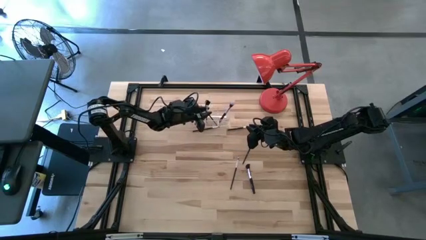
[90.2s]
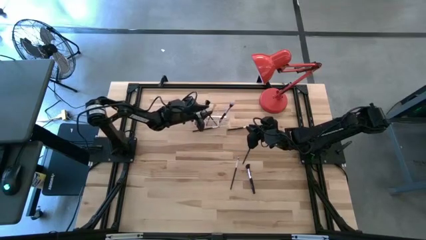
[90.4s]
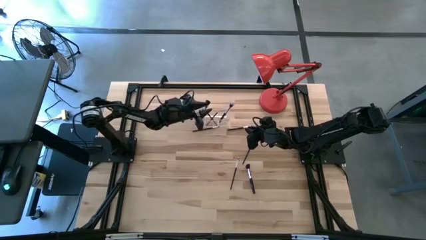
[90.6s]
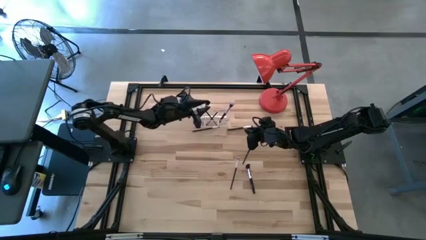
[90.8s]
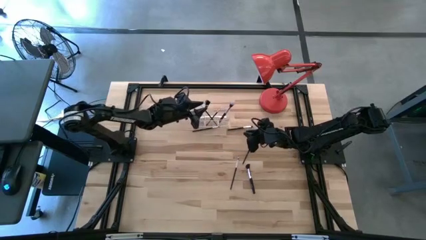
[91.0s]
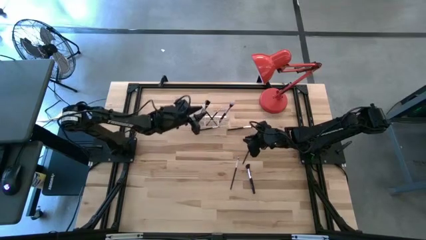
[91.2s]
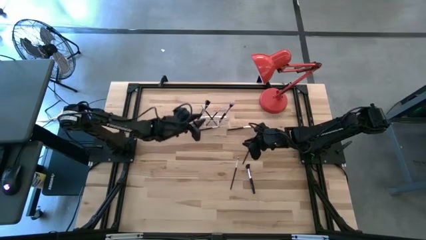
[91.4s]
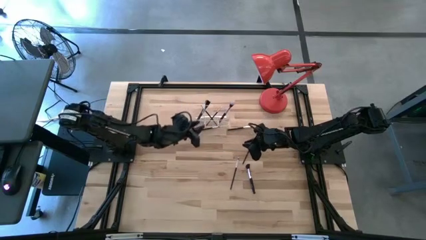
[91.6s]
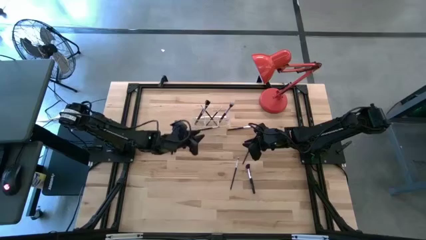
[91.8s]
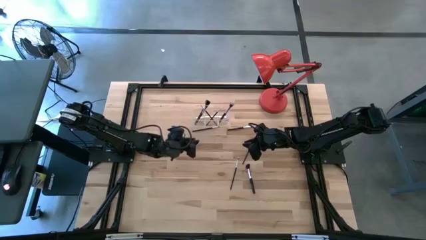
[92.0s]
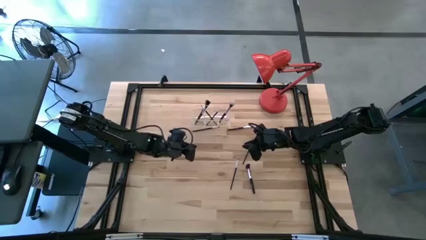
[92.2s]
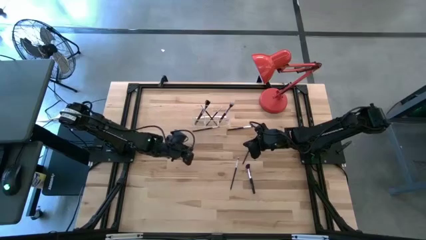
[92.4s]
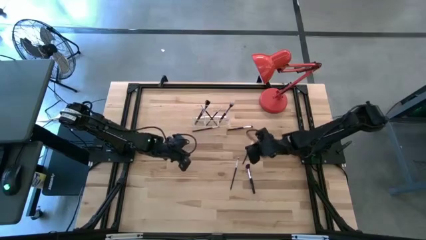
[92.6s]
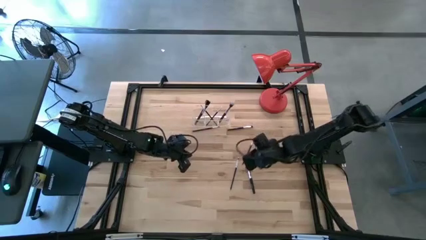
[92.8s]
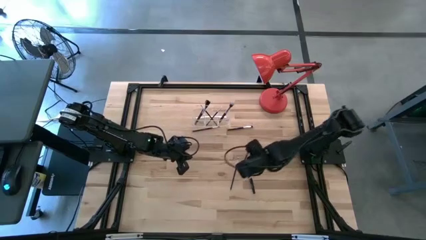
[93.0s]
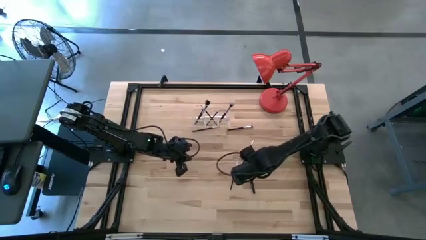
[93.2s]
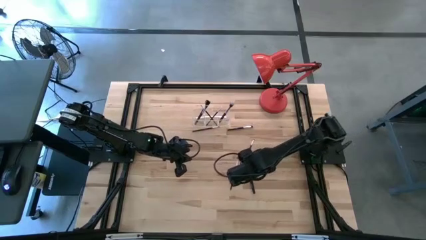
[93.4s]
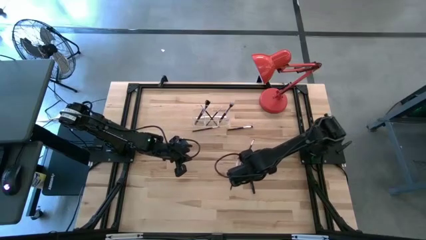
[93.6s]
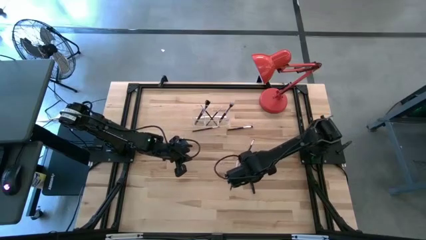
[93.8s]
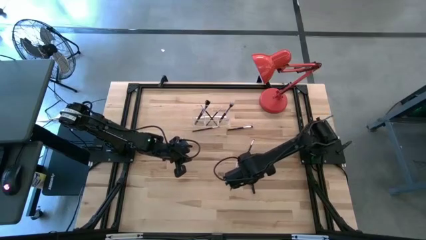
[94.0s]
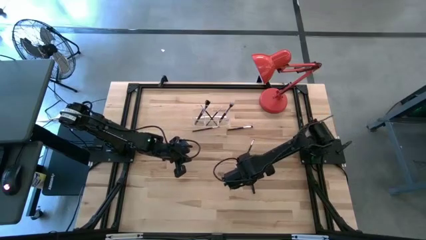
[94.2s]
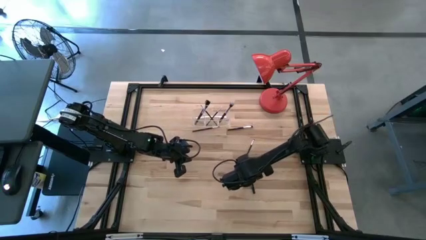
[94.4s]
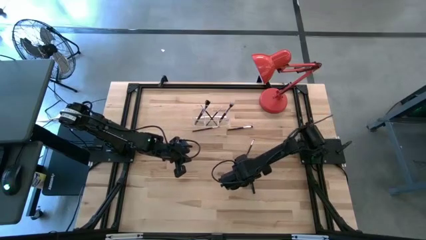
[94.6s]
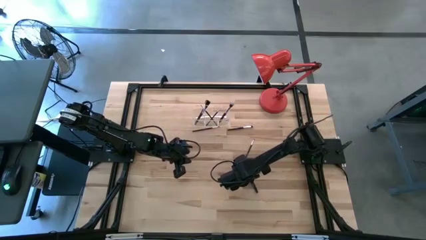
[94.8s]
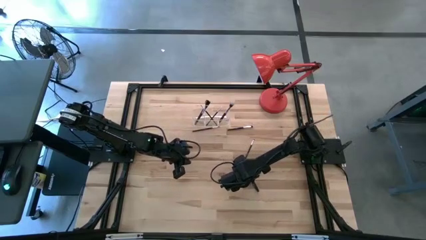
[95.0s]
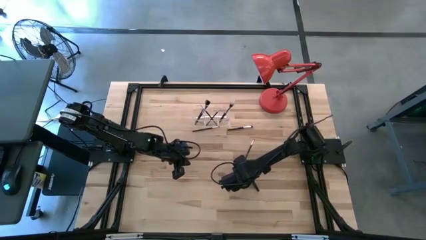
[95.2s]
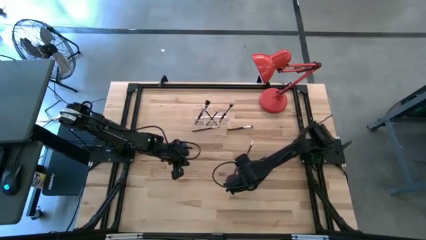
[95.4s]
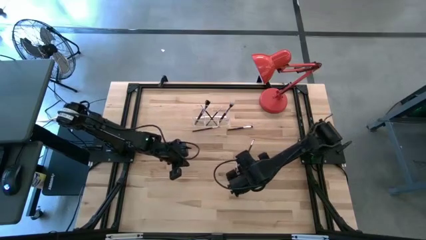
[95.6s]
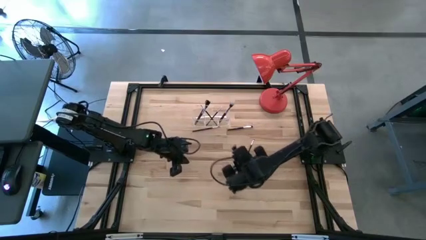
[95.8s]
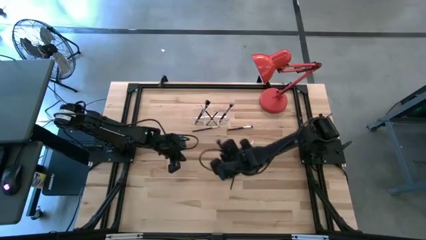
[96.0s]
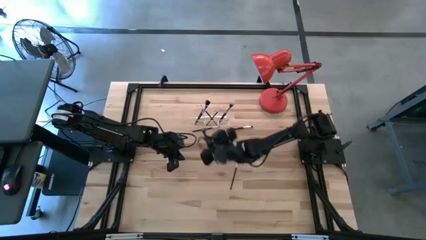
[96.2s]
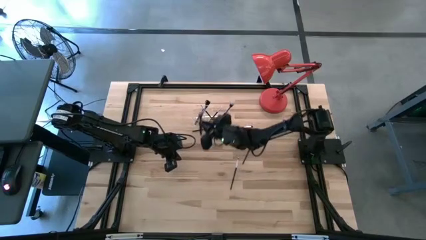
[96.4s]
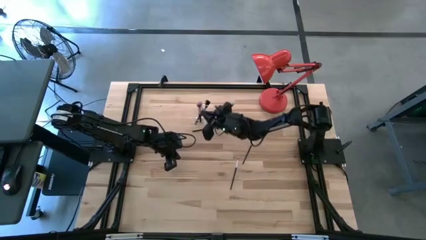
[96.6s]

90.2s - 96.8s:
Task: Put items in baskets/containers
Put the black powder brush into the transparent organizer

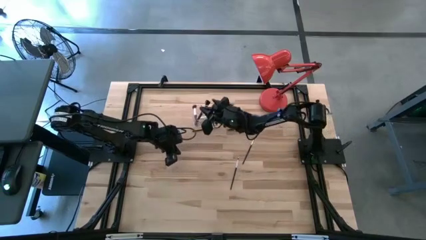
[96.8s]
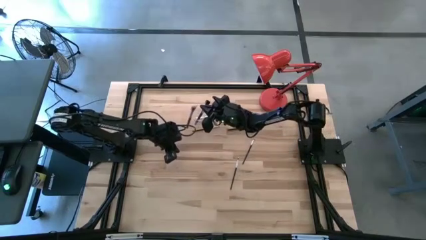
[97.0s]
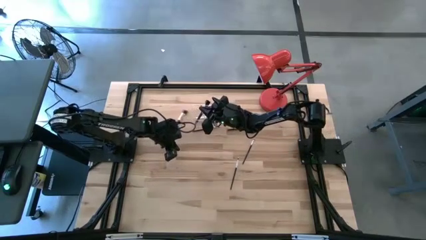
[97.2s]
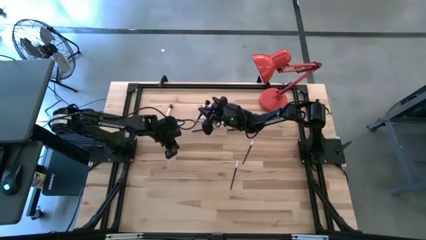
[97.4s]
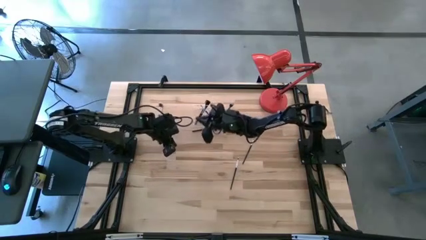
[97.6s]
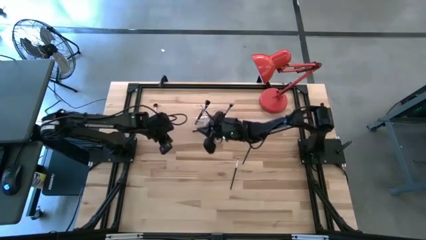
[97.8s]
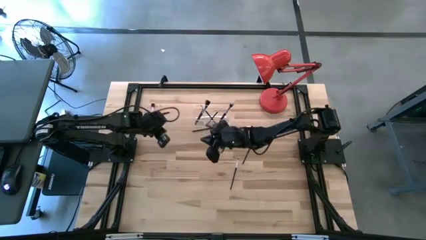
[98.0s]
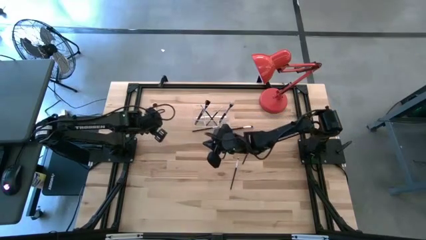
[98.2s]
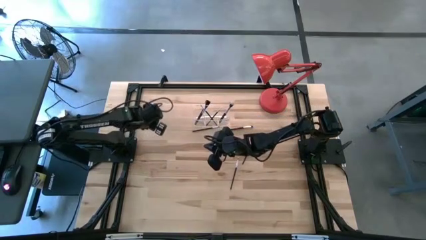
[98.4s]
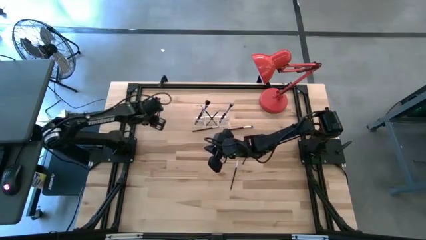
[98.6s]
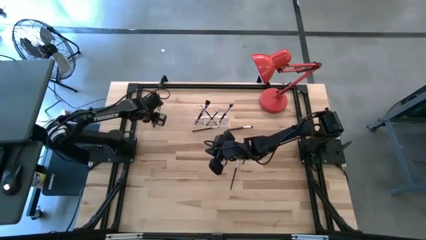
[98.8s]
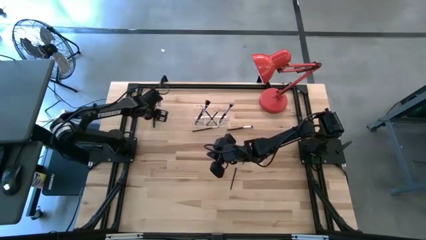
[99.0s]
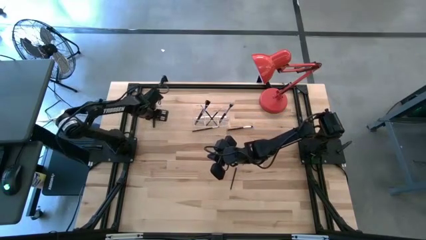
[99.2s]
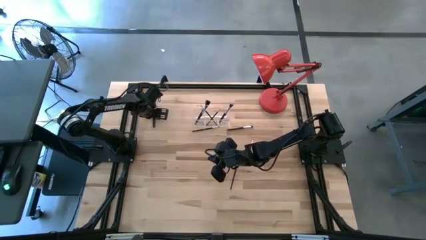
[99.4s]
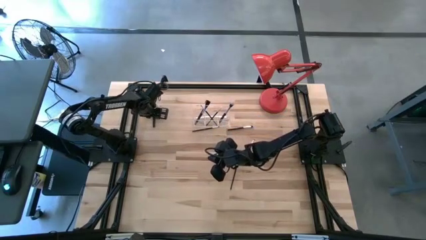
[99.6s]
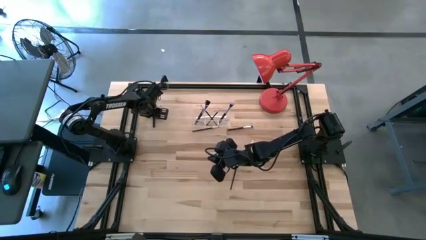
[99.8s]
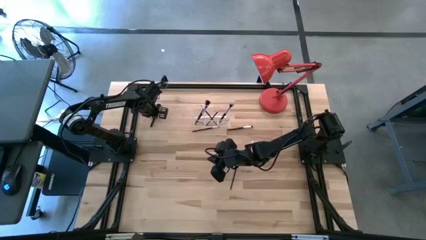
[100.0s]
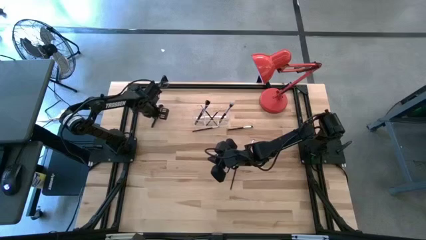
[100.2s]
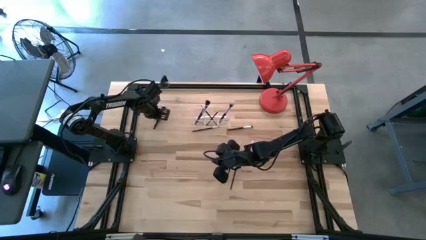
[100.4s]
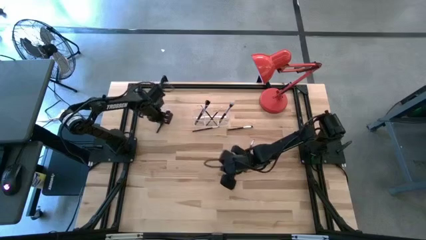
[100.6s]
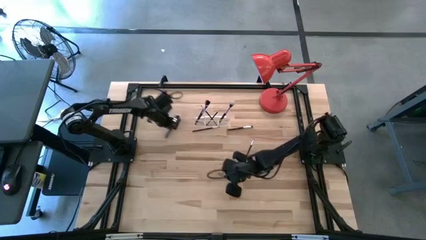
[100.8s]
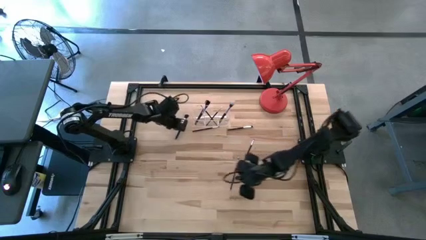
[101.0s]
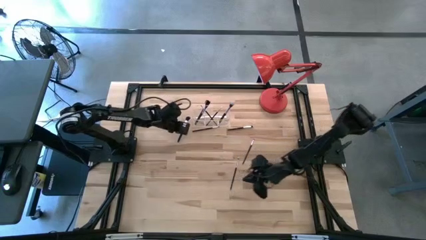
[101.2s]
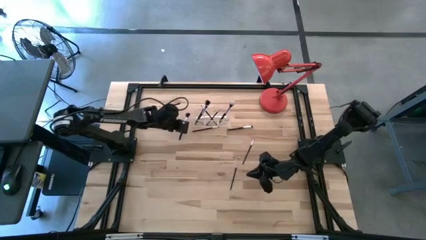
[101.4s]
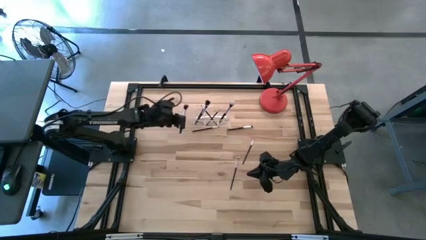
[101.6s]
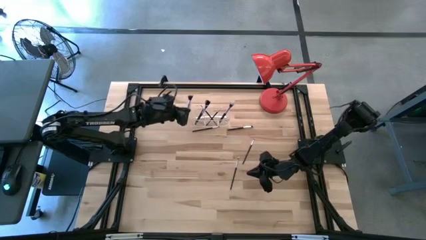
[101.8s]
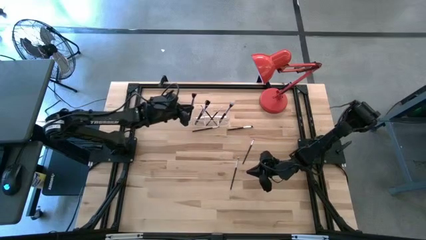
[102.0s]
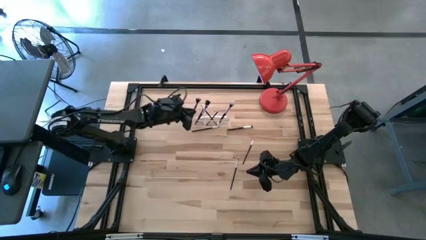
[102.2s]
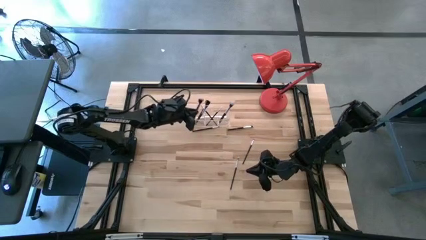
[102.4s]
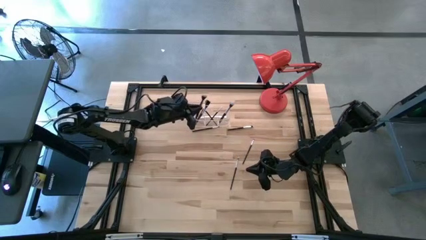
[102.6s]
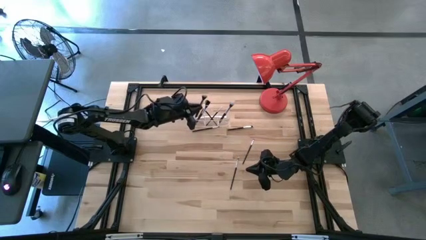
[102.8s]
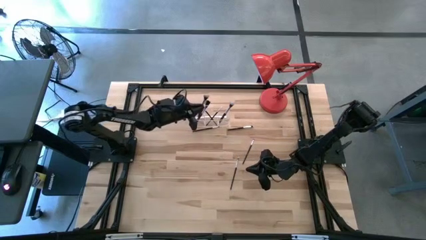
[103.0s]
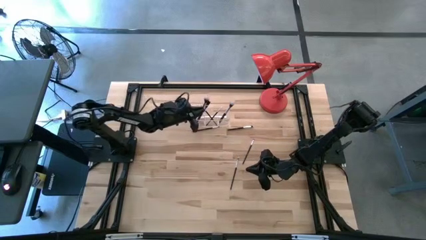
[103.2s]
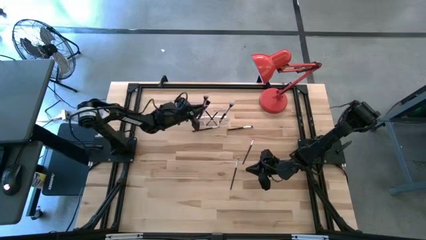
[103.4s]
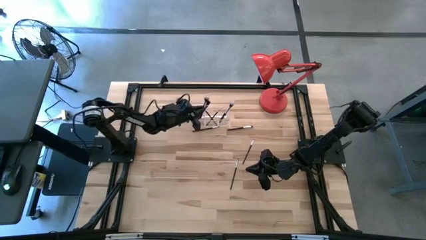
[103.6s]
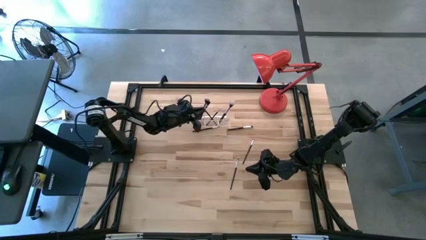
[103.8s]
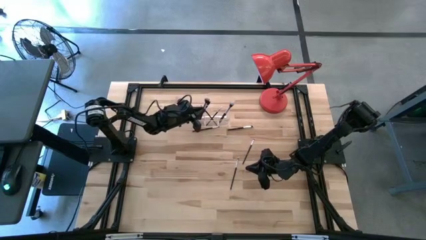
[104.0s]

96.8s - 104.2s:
Put the black powder brush into the transparent organizer

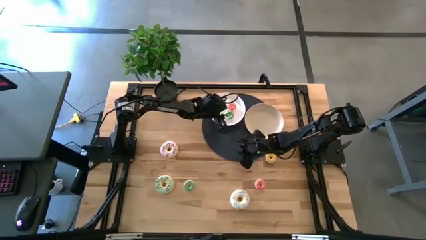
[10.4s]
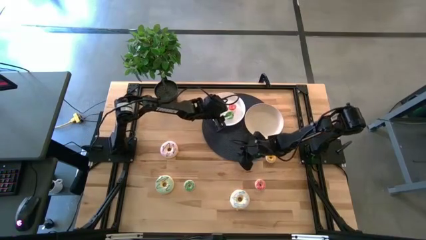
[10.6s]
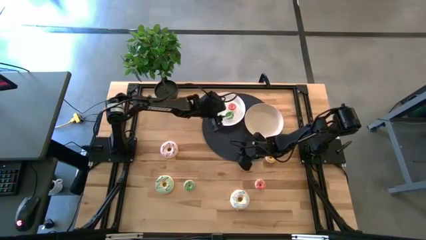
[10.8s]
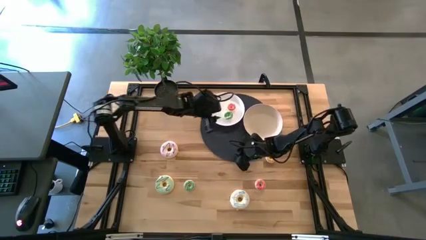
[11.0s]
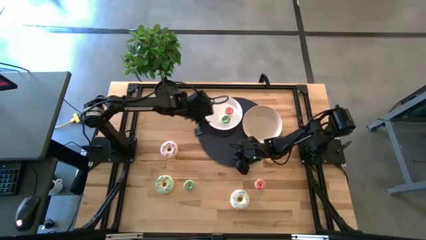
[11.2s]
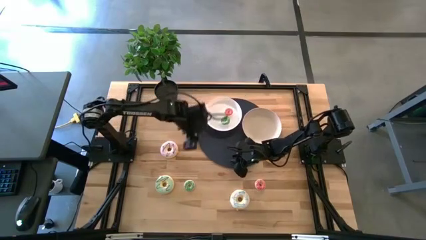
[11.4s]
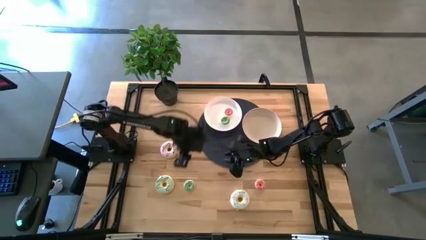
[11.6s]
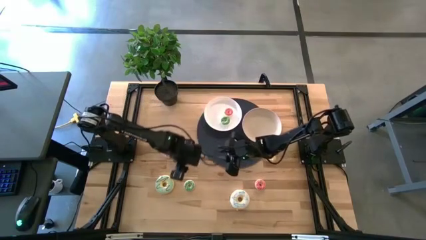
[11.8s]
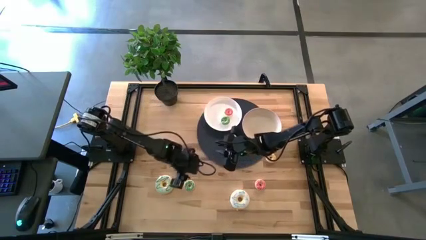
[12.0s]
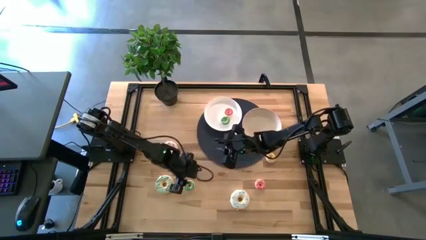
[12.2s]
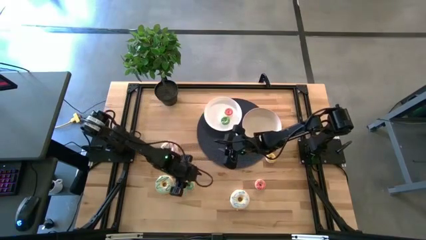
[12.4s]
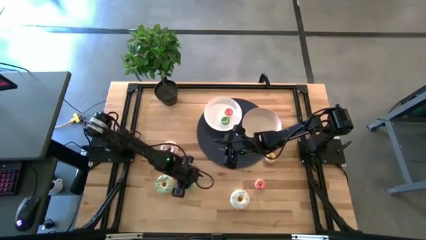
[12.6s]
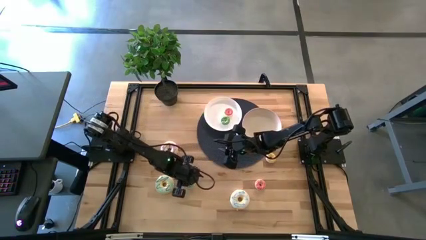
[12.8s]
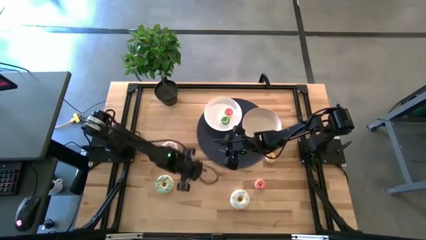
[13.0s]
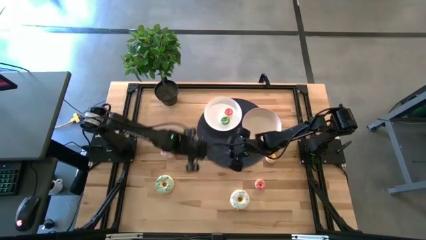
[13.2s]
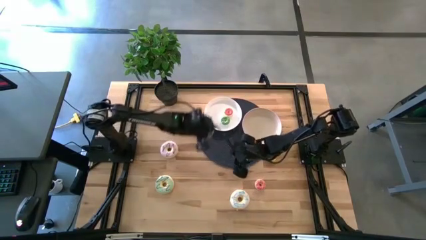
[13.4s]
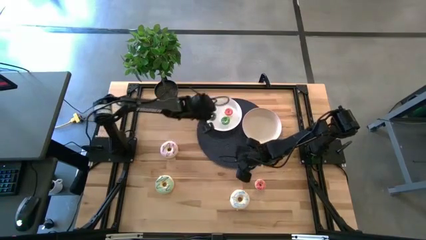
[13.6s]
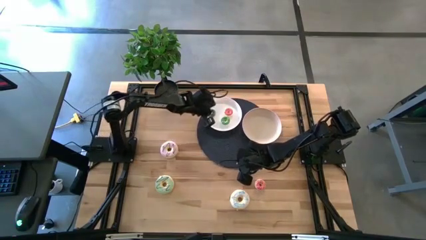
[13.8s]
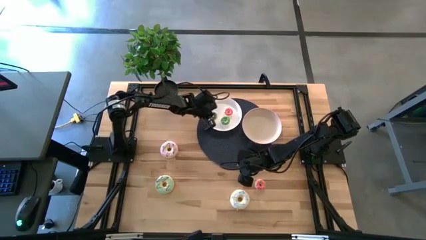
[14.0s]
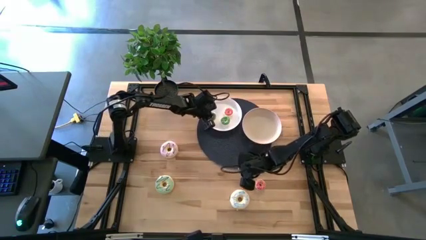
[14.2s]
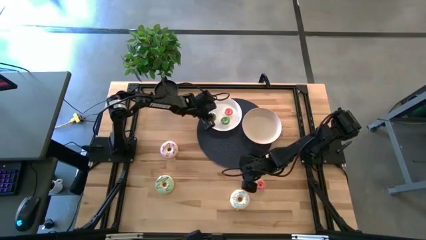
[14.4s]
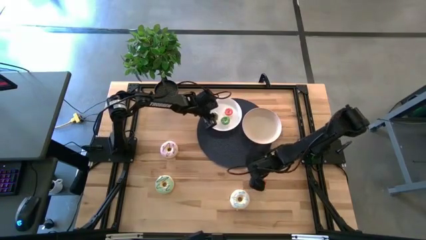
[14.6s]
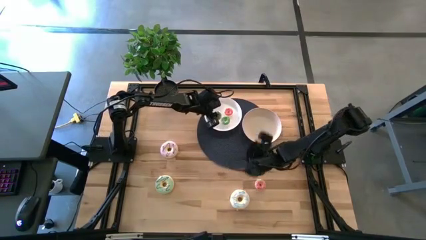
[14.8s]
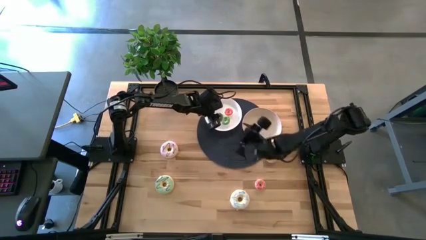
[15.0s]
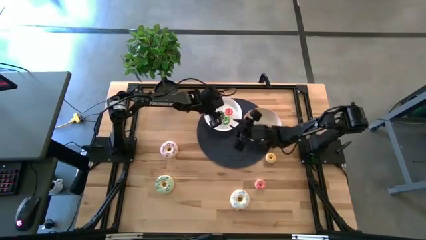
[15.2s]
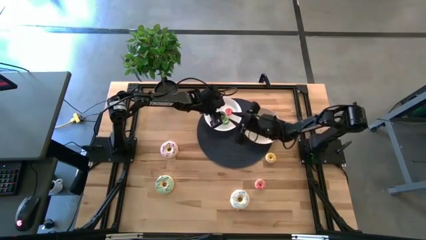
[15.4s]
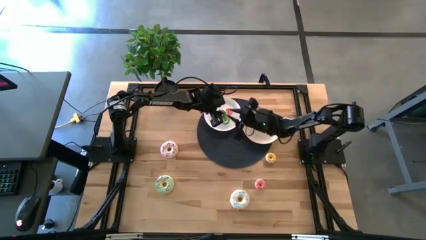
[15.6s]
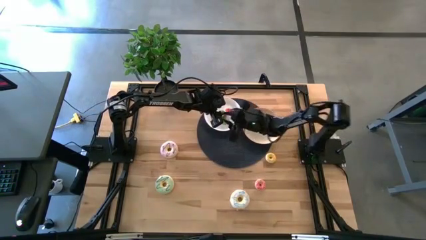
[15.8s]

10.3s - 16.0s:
Task: Pick & Place donuts
Put the small green donut on the white plate
